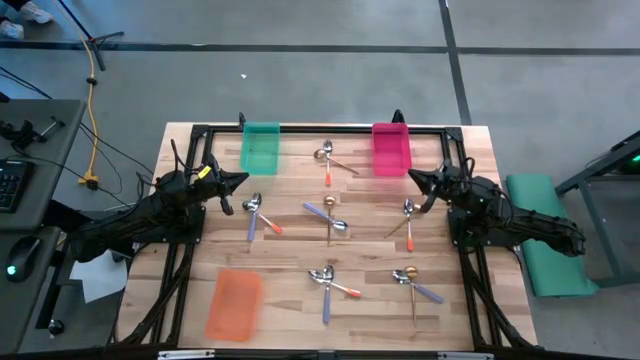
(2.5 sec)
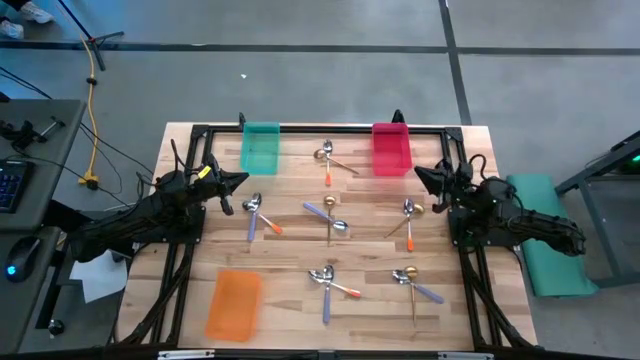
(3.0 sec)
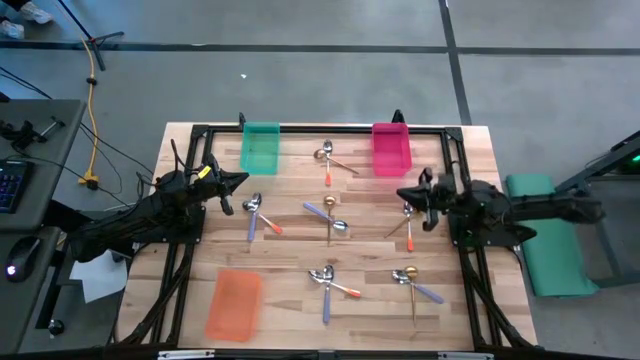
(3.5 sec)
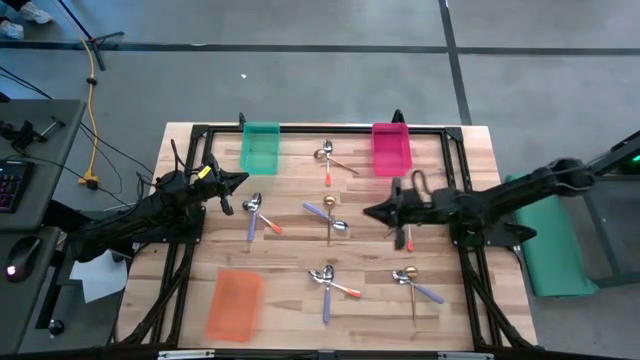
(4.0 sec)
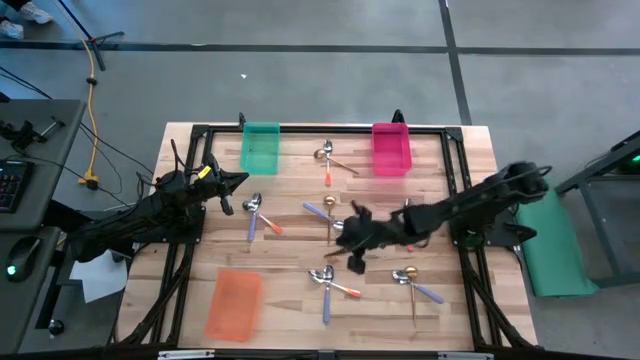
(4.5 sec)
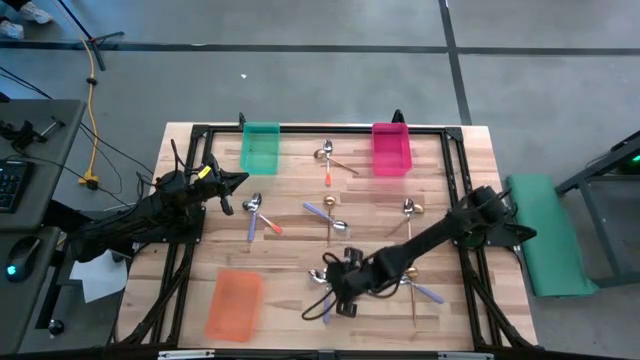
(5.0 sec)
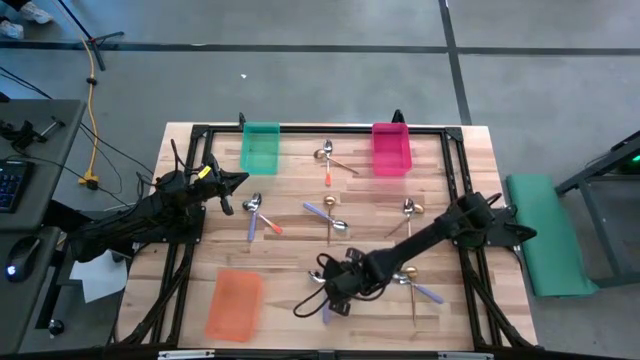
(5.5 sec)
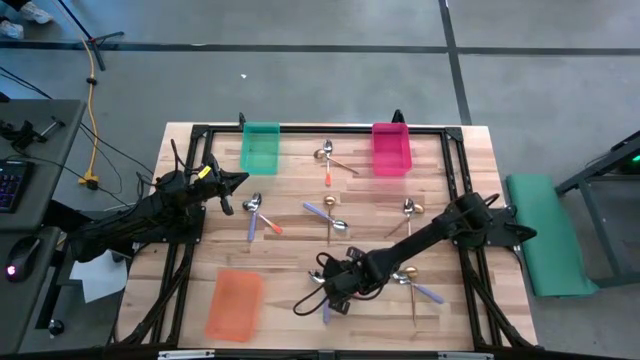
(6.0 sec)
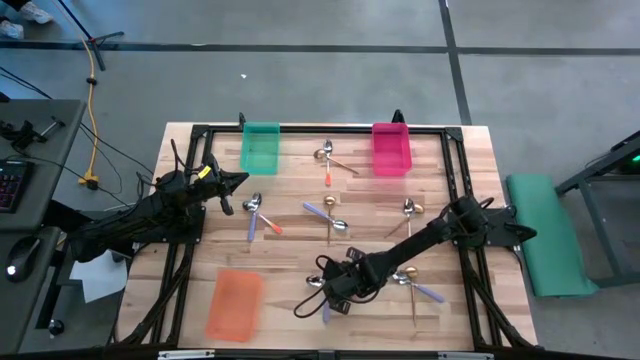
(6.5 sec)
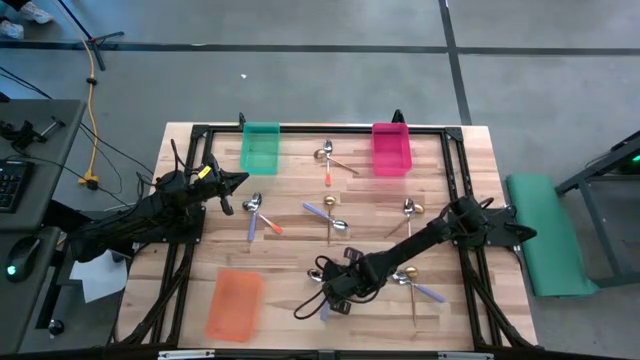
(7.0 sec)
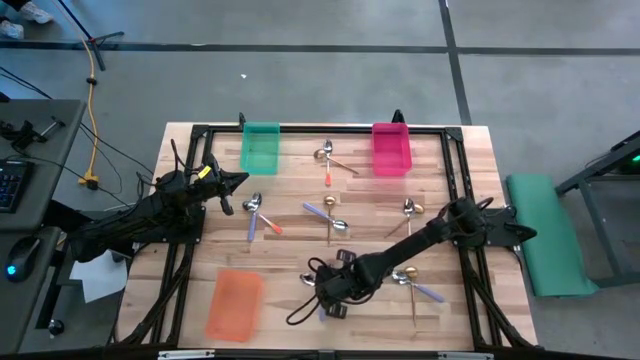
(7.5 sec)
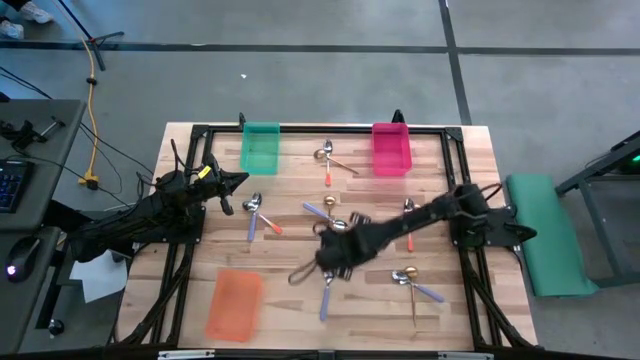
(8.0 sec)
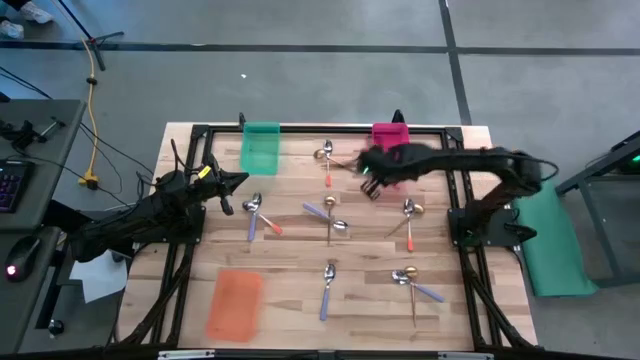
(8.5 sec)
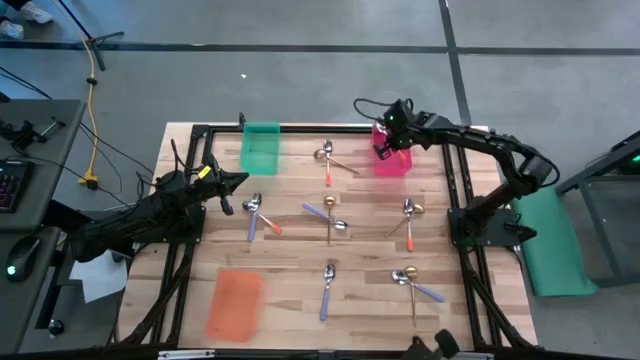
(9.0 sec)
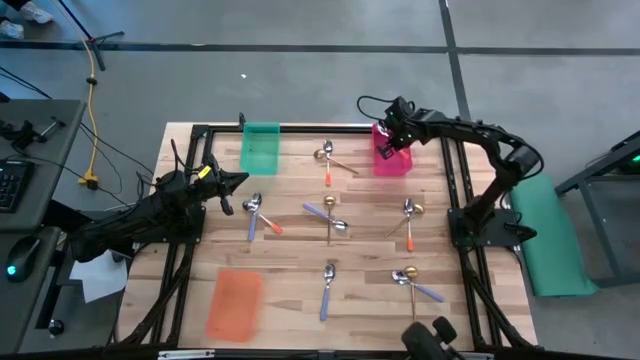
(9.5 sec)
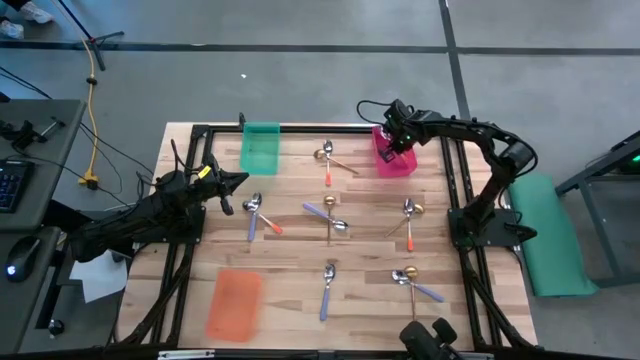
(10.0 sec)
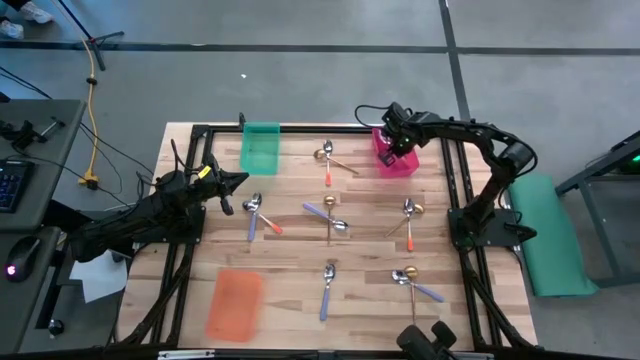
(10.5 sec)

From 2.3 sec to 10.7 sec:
Task: Sort silverware by color (type)
Put the orange spoon into the pink bin

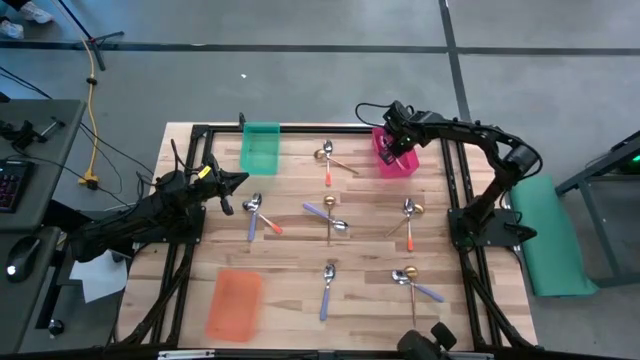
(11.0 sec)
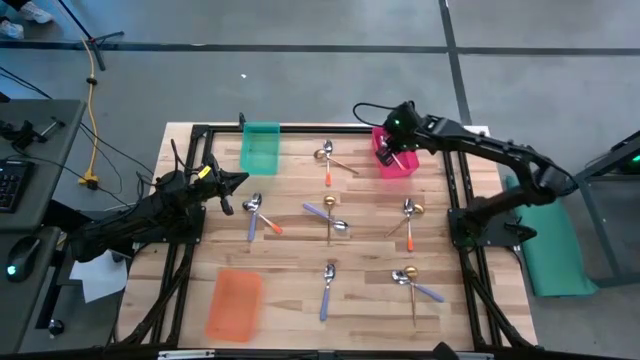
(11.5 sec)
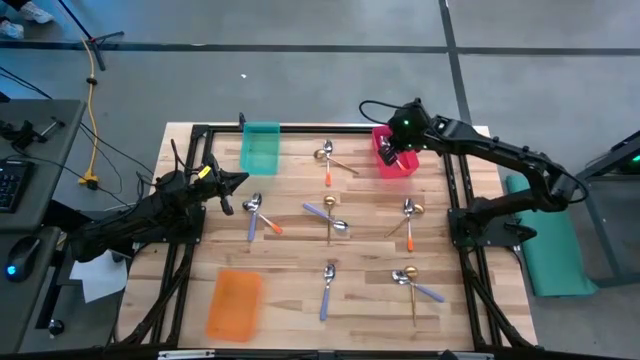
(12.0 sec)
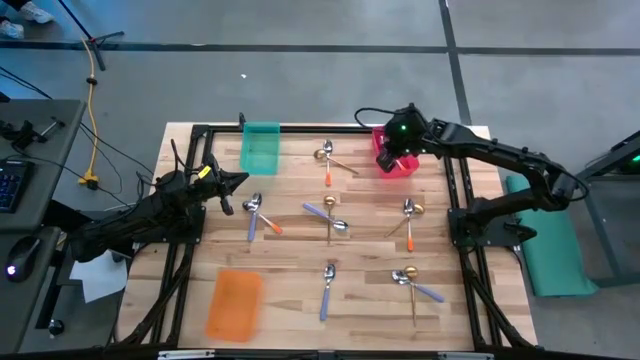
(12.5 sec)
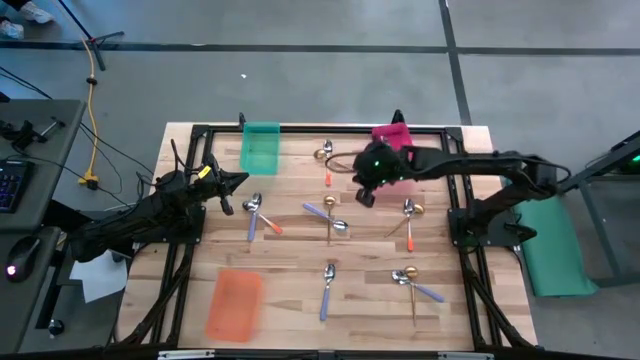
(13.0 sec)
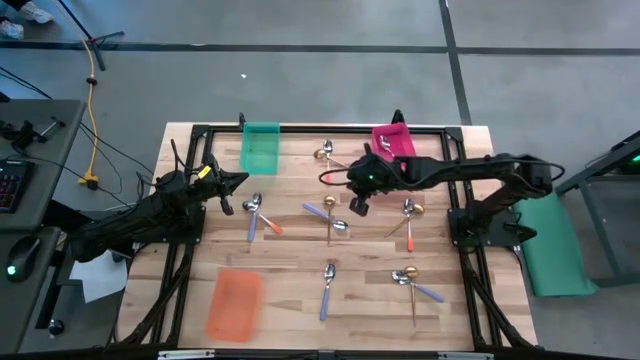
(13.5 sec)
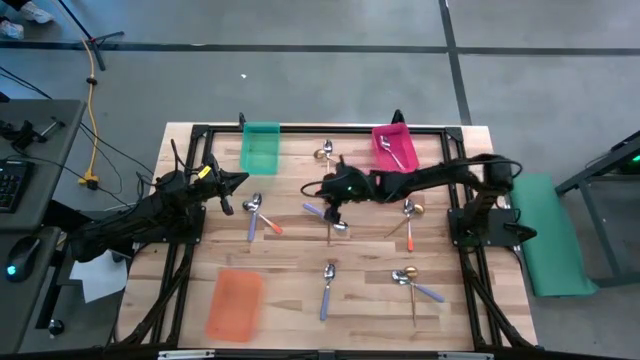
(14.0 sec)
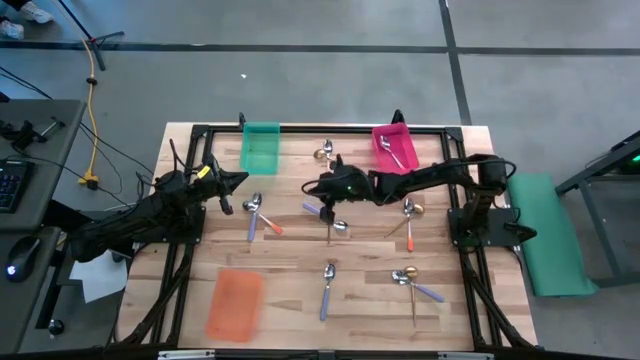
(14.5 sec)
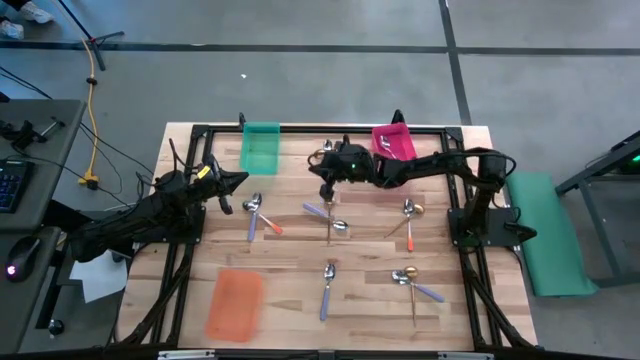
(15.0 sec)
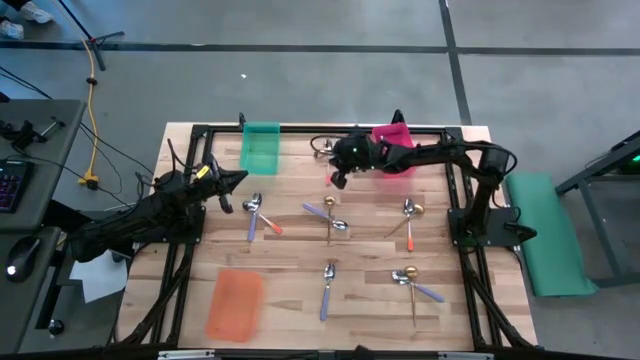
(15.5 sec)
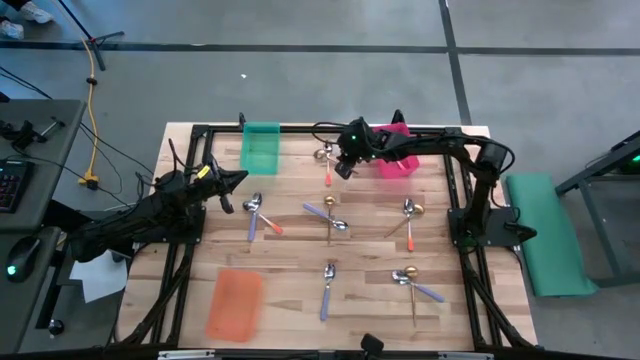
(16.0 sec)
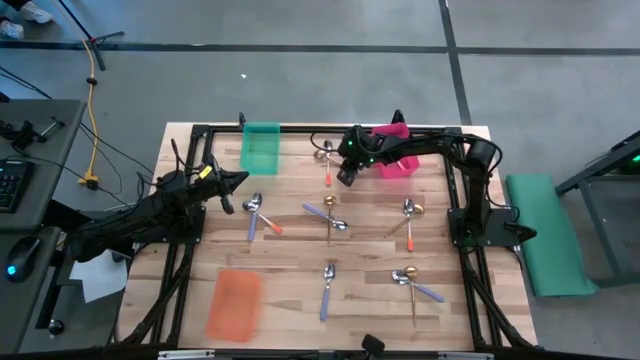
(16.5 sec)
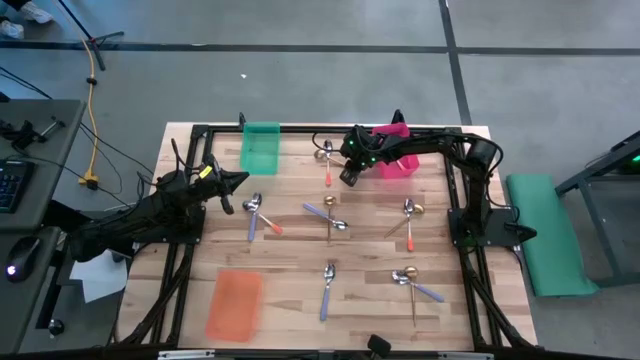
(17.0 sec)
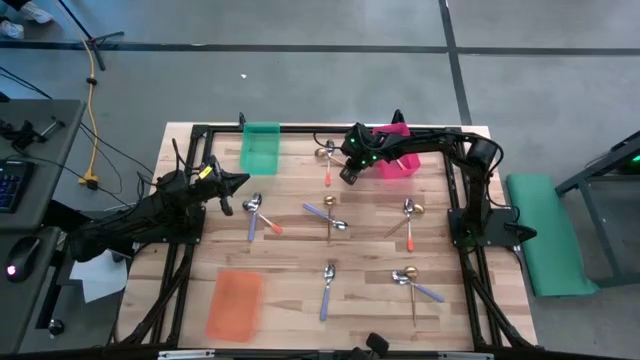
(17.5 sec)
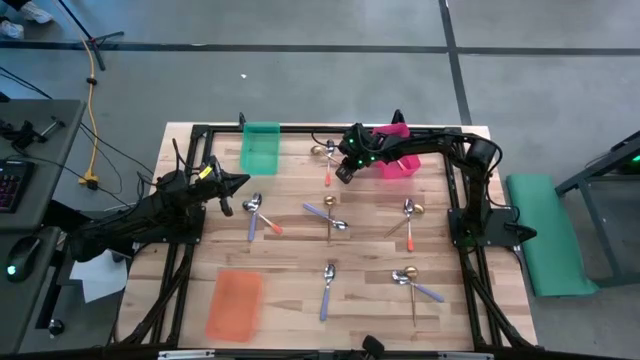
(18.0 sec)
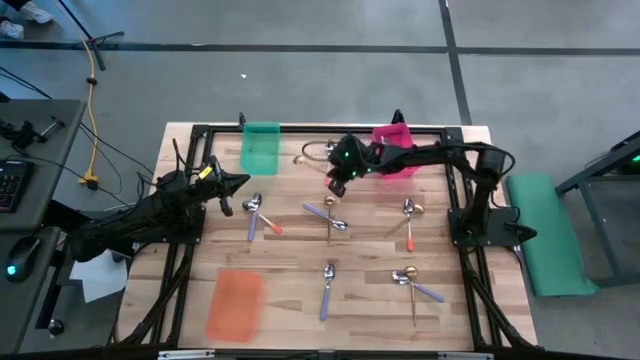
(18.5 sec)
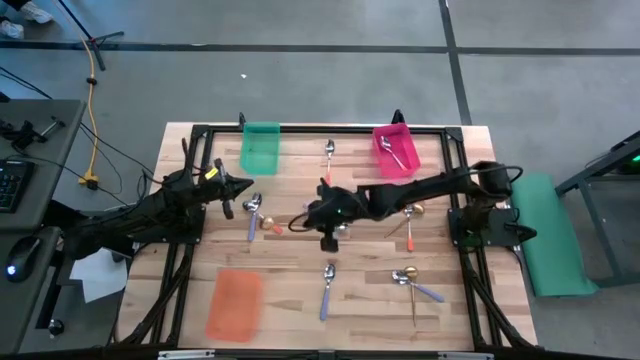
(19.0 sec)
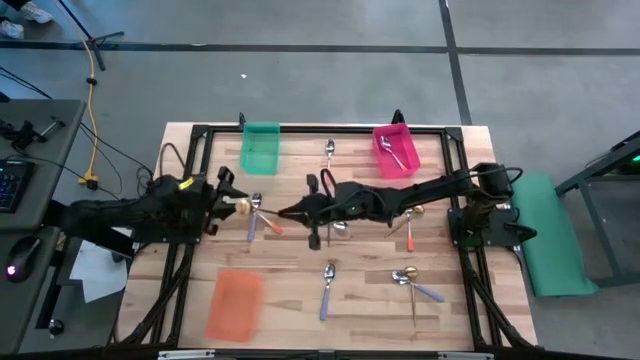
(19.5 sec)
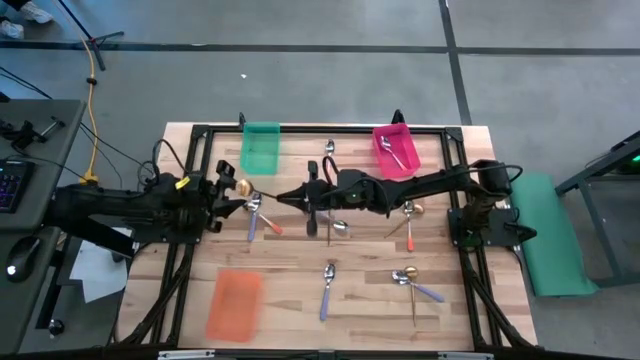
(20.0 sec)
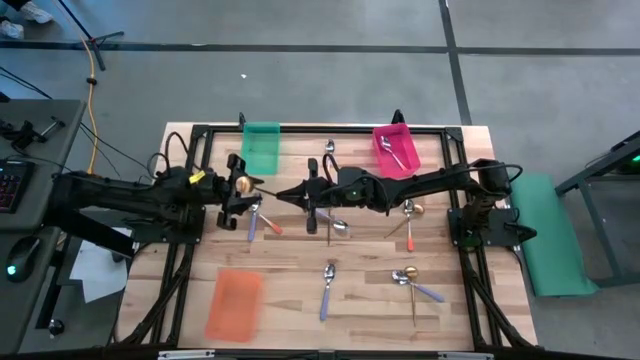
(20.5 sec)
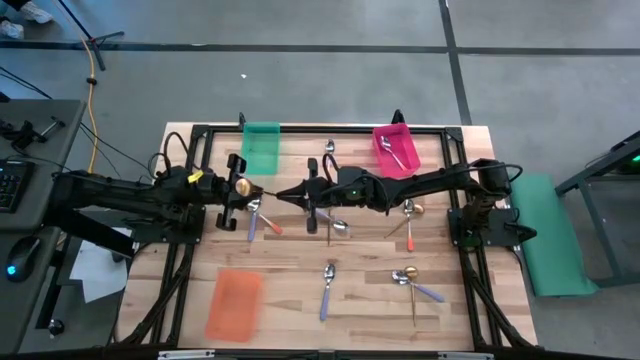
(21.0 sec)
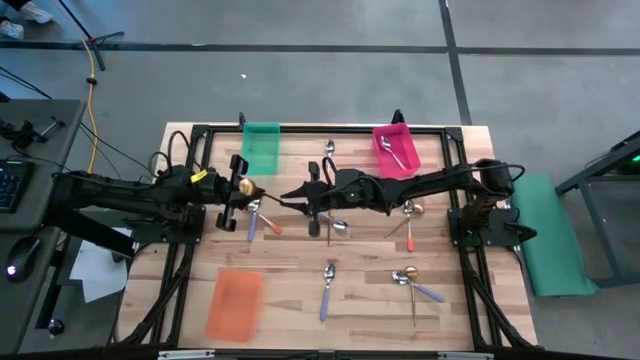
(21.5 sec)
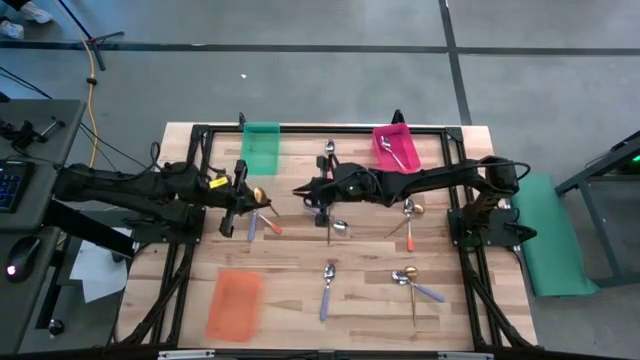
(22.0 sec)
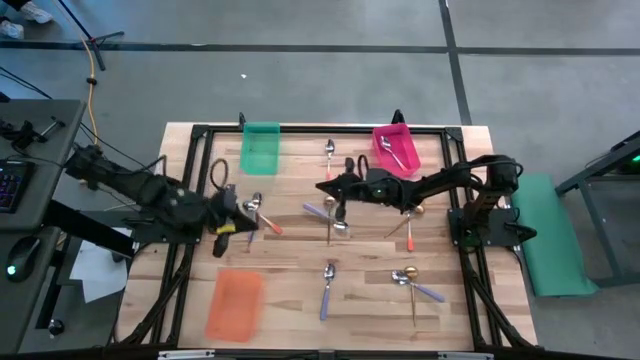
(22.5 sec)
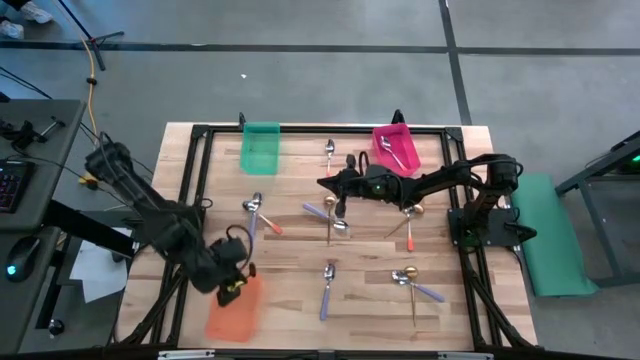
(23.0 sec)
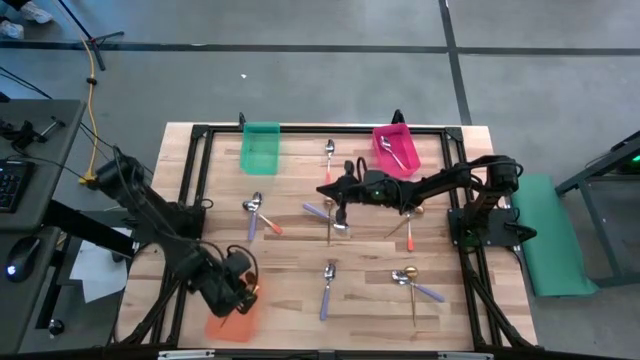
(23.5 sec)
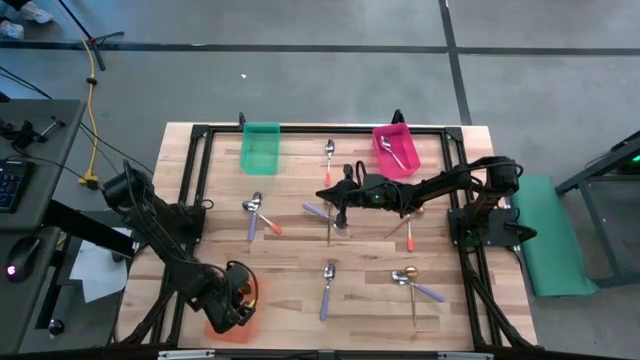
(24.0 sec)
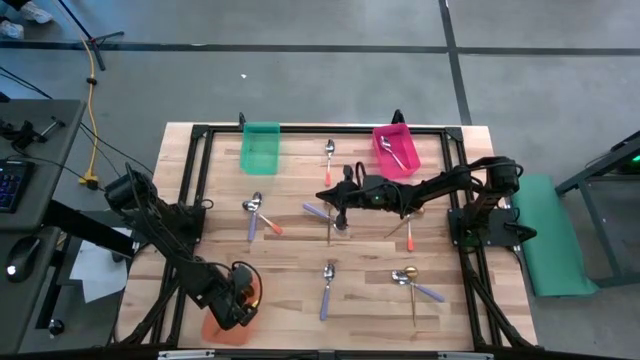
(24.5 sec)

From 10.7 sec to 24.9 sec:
Put the gold spoon into the orange bin
